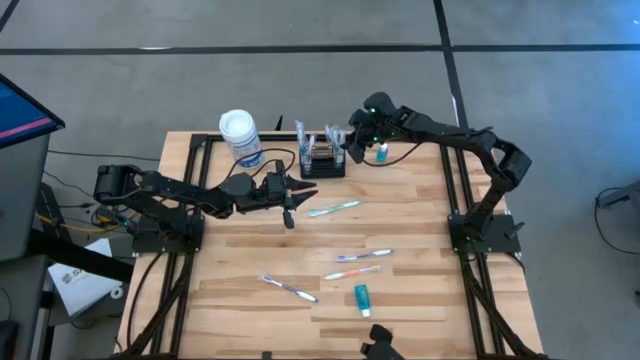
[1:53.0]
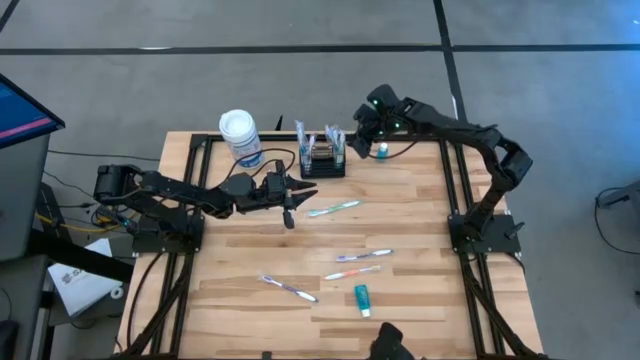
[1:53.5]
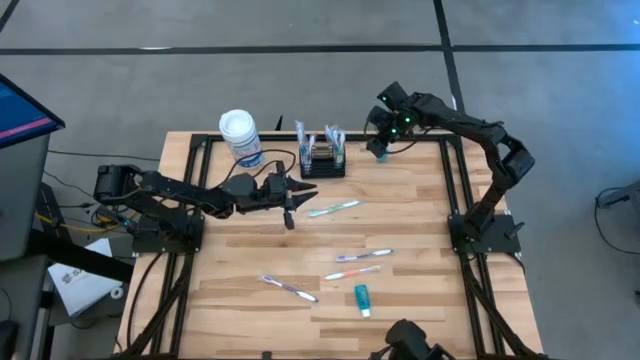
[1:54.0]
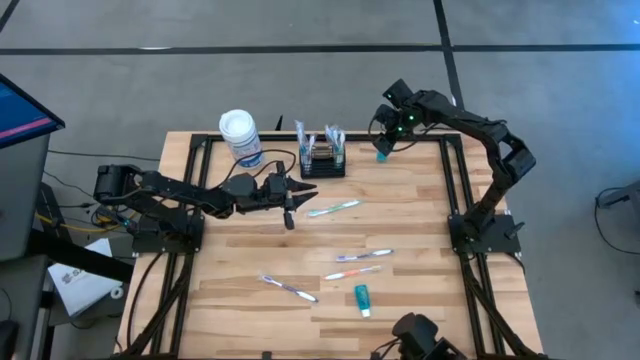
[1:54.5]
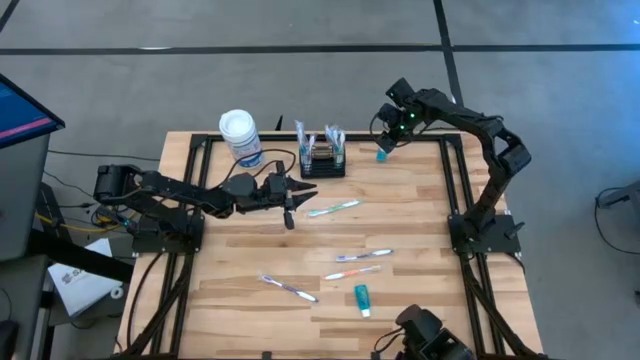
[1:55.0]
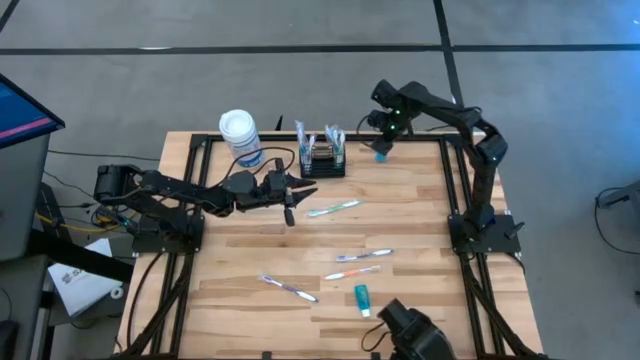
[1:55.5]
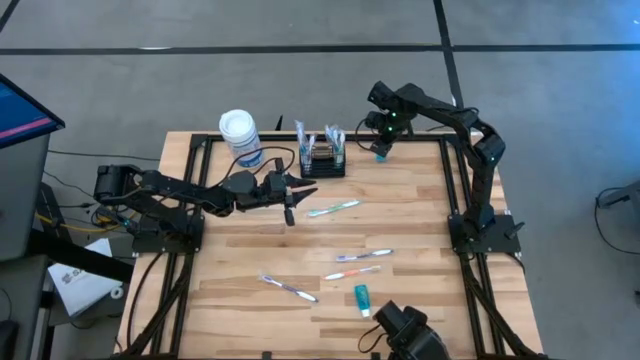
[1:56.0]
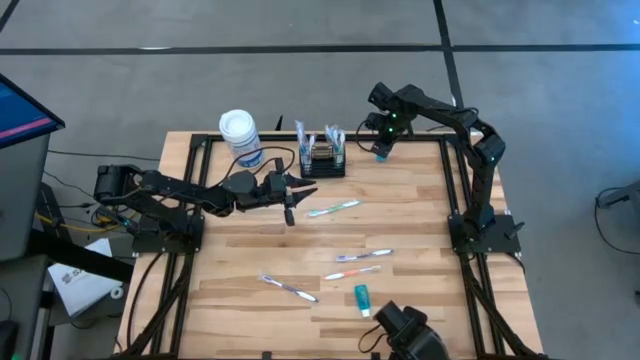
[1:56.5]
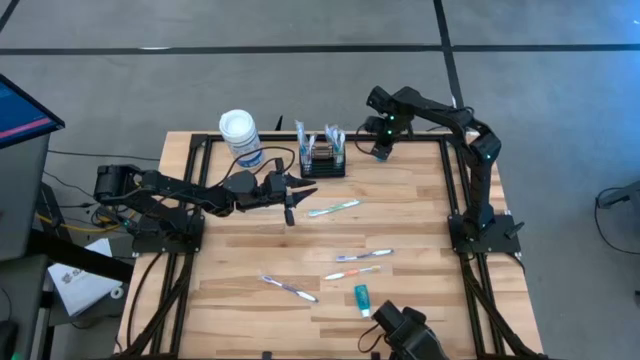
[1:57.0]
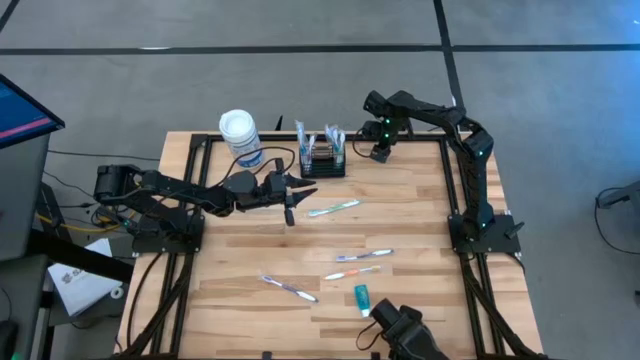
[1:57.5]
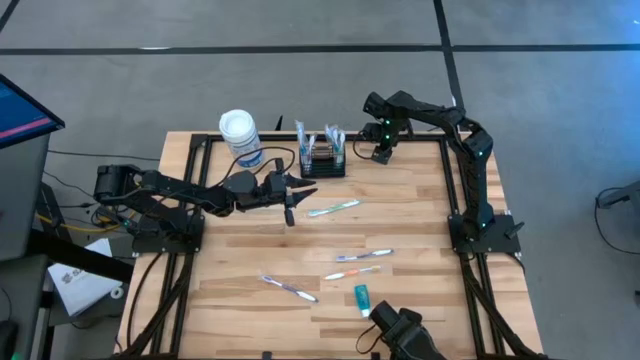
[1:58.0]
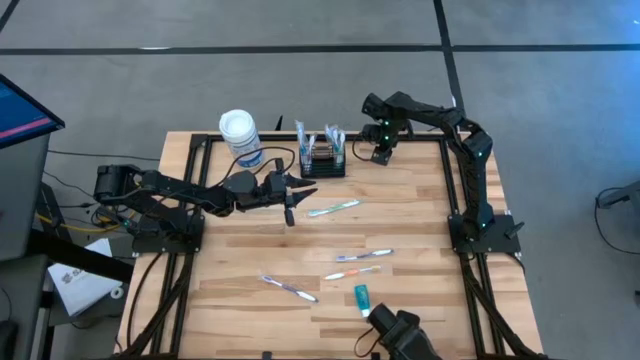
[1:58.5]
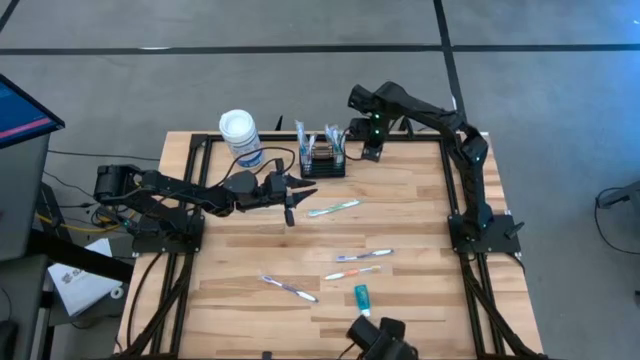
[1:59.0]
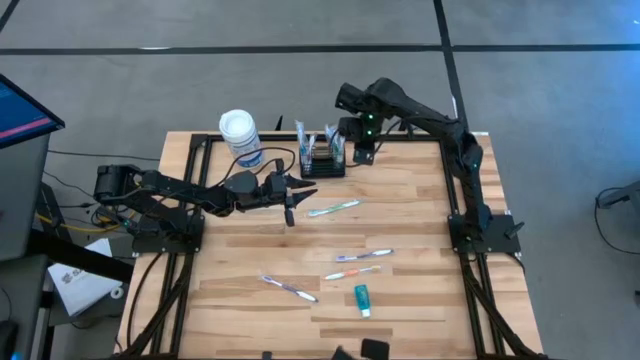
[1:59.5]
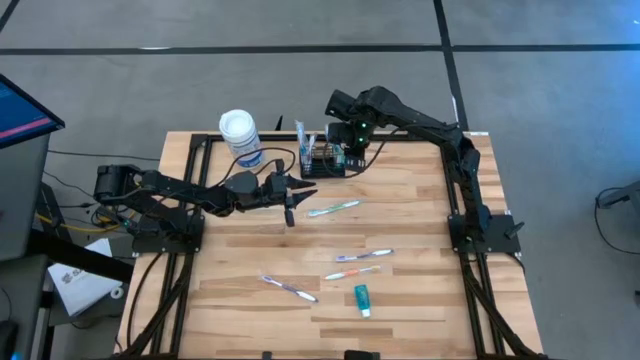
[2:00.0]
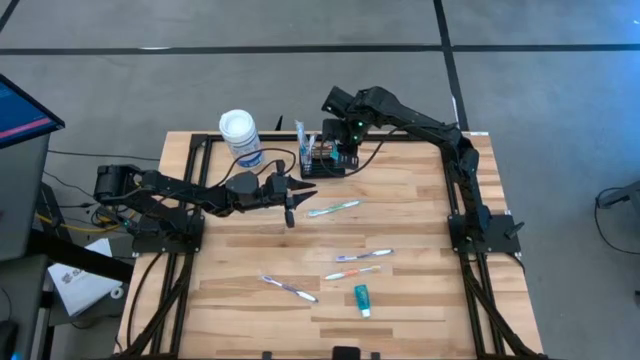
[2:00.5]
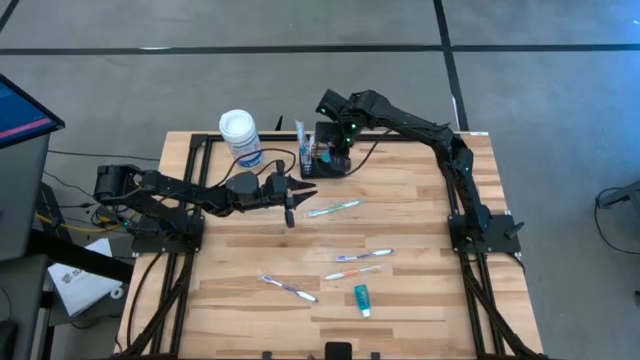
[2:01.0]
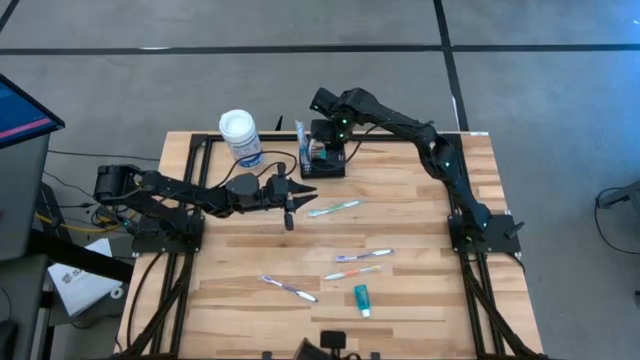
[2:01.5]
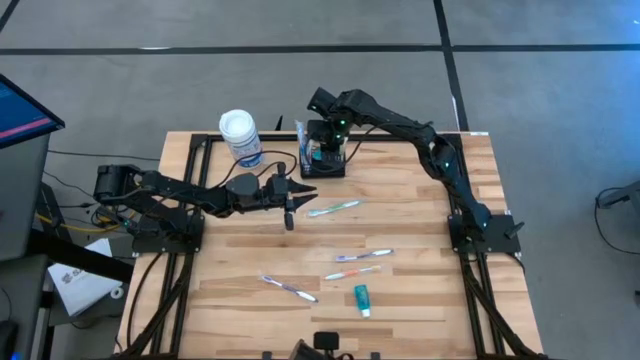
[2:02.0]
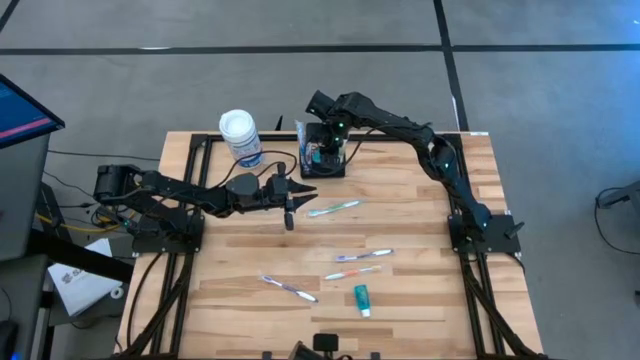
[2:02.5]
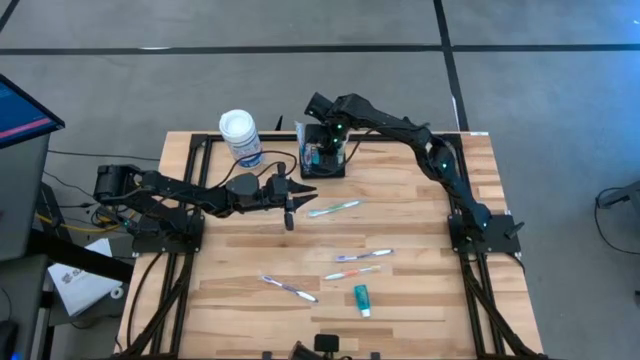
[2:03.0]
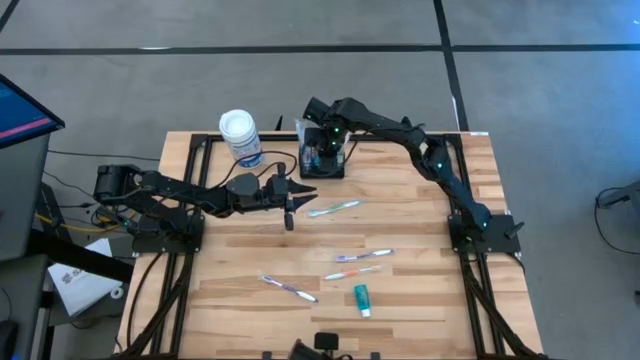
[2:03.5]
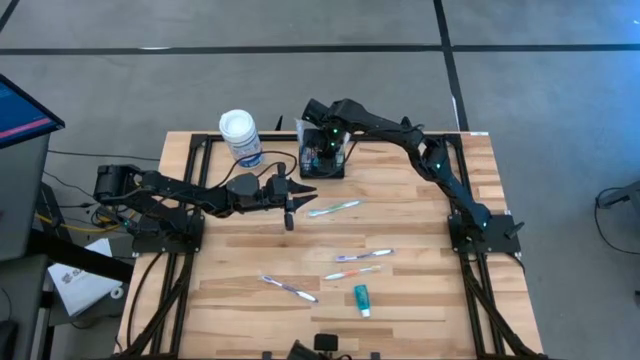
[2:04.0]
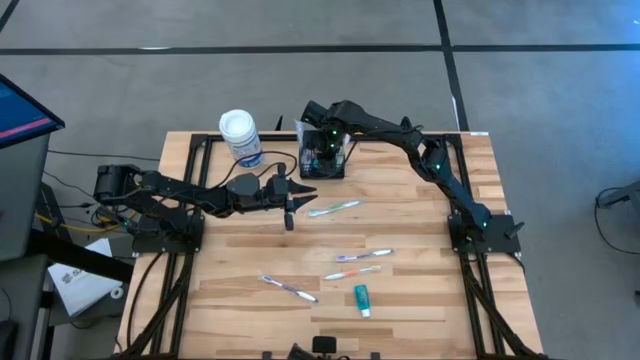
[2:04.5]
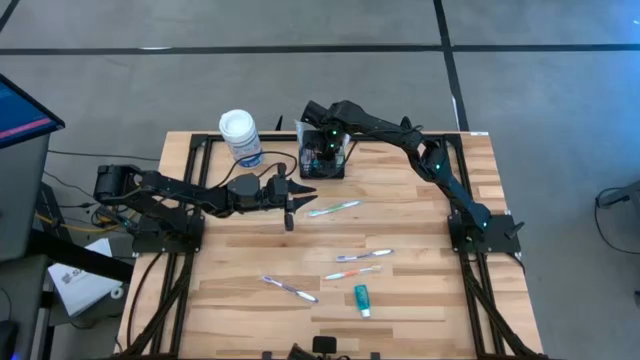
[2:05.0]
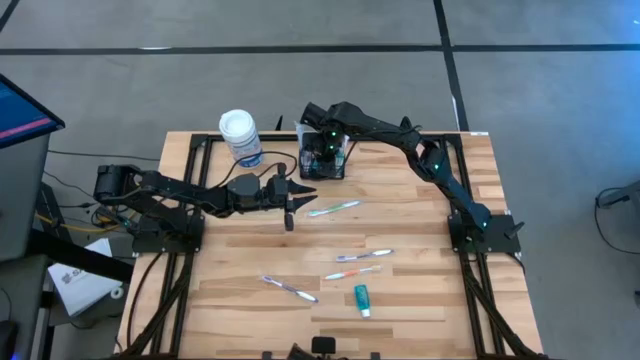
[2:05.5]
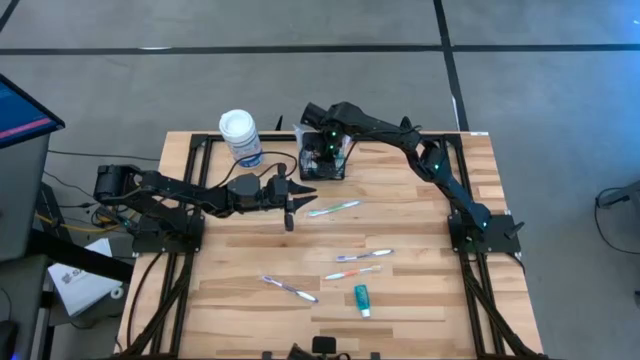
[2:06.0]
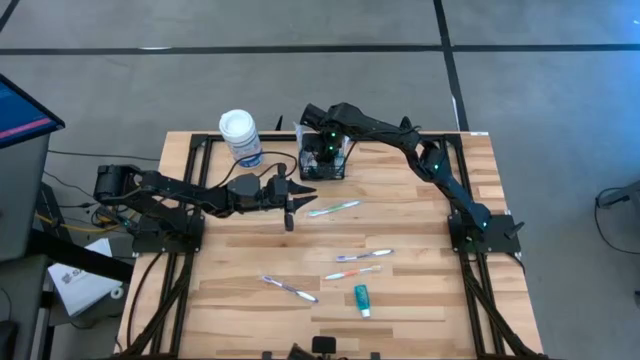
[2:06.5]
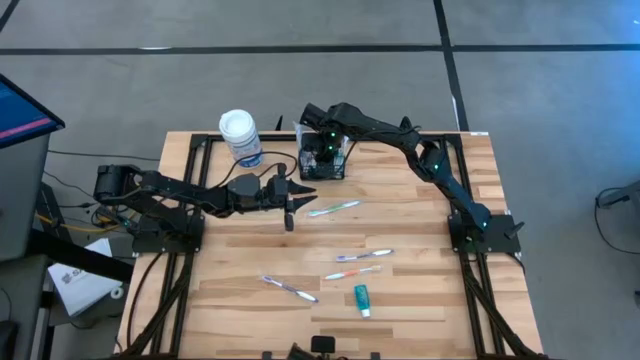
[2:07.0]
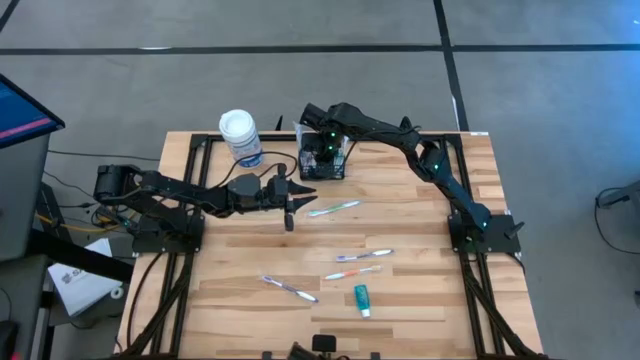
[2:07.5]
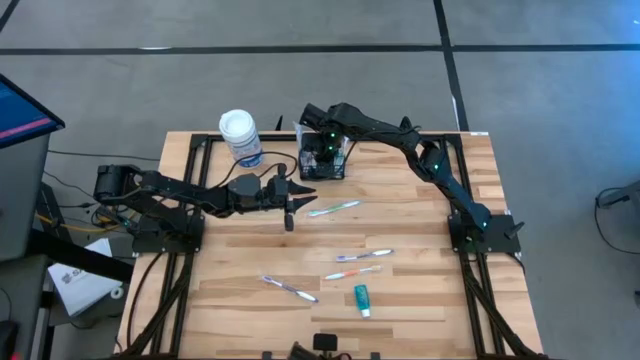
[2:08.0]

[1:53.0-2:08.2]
Task: Pick & Place toothbrushing station
Put the top blue mouthwash into the black wire organizer

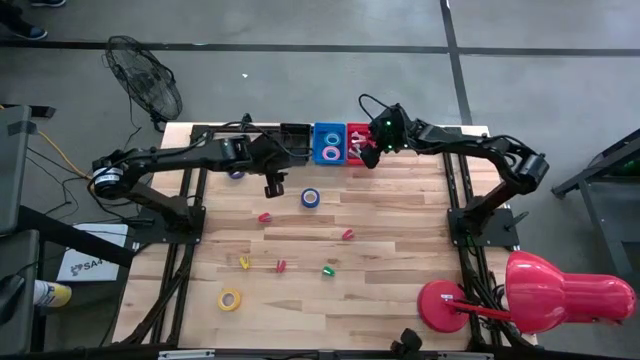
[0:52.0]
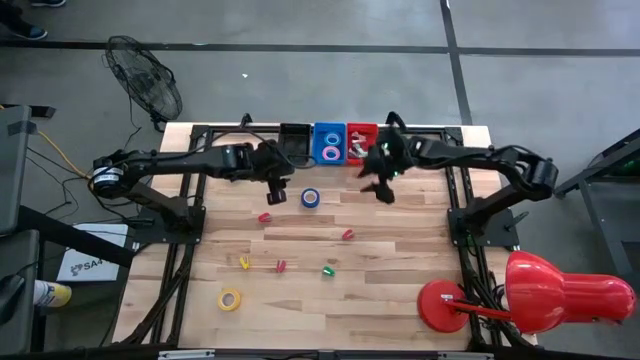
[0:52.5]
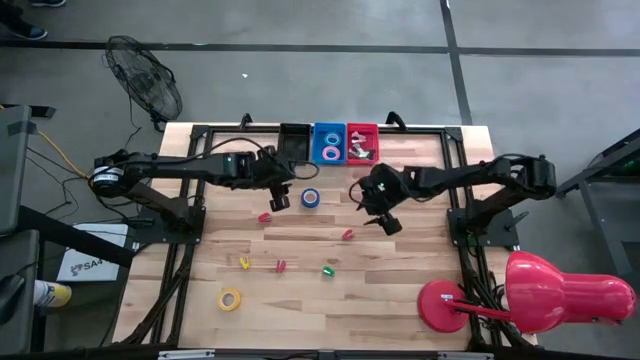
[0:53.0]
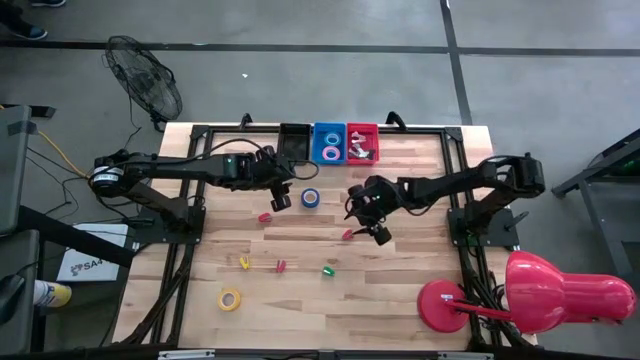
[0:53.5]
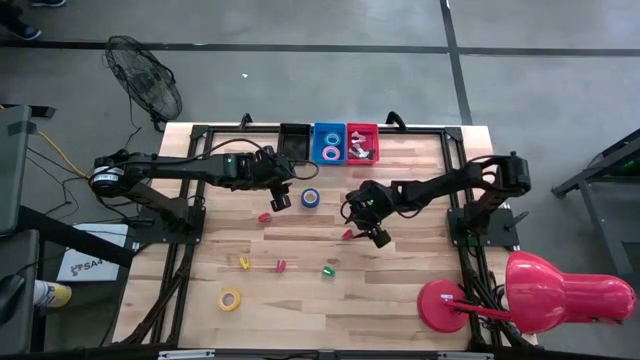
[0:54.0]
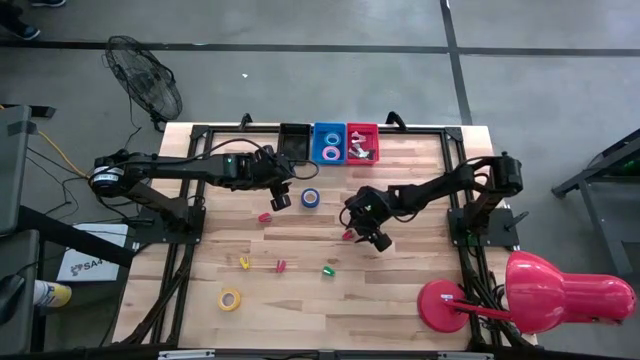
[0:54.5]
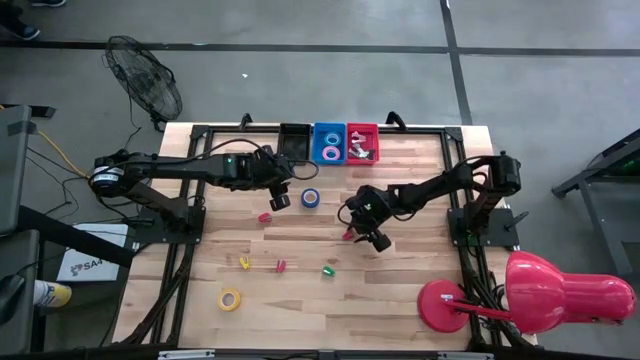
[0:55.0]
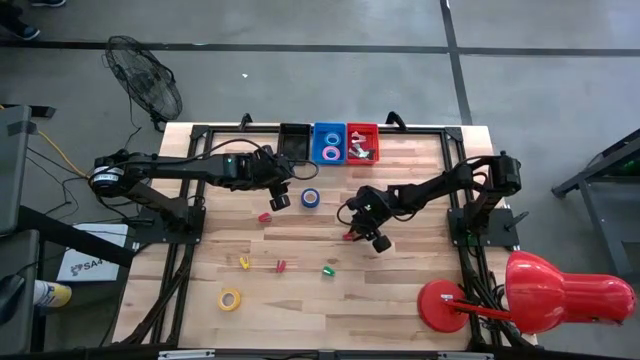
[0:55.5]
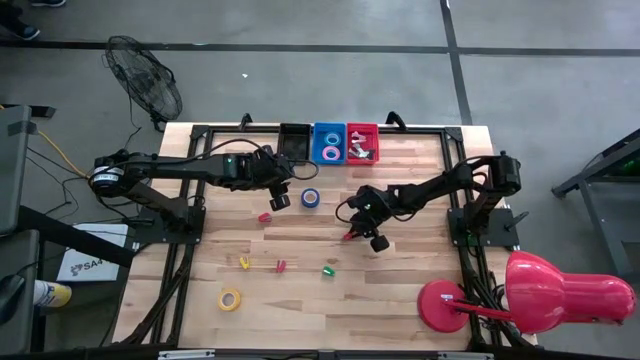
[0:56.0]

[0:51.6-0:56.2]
Task: Pick and place Stapler, Stapler remover, tape
Put the top right red stapler into the black bin
